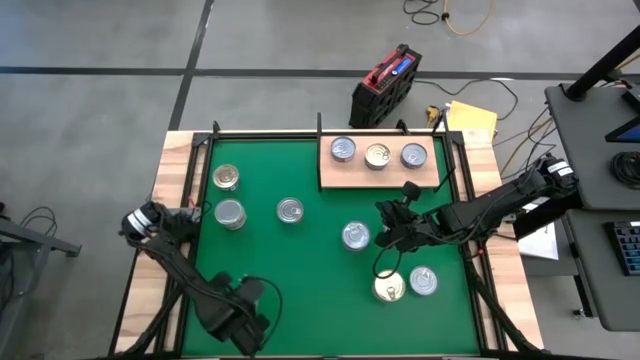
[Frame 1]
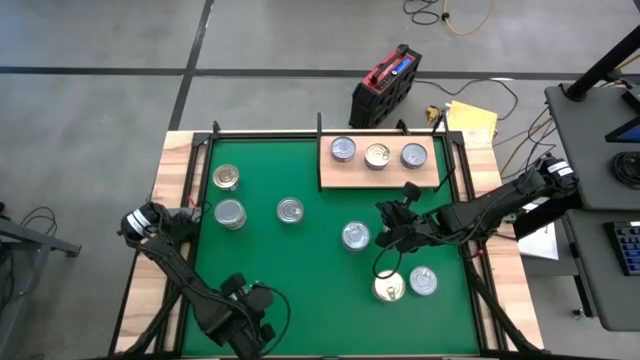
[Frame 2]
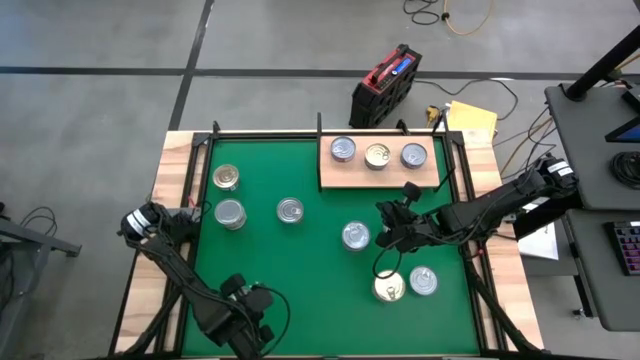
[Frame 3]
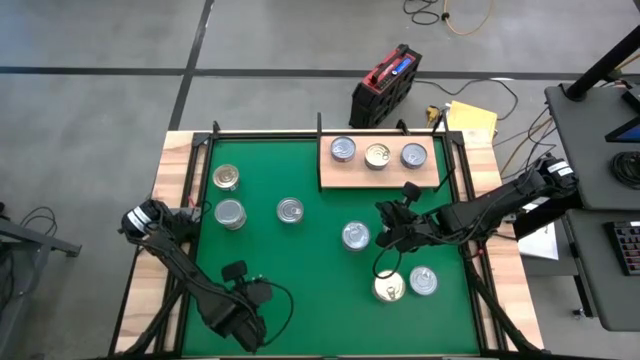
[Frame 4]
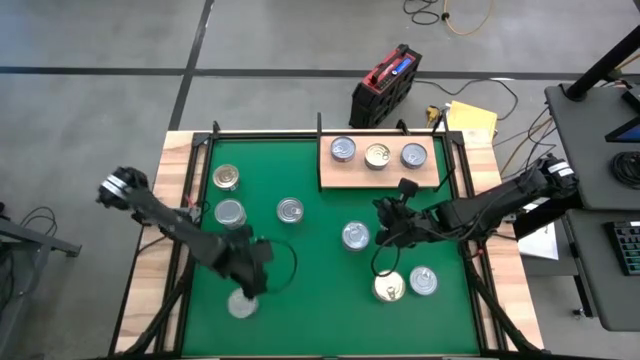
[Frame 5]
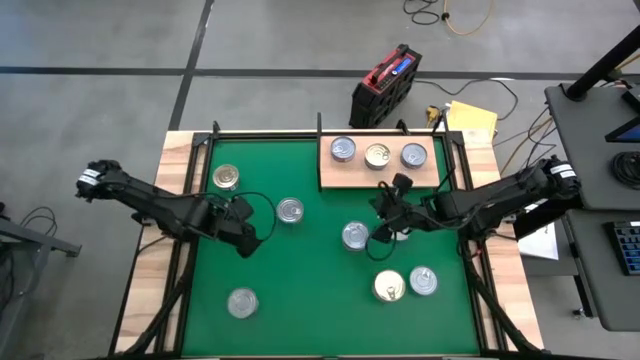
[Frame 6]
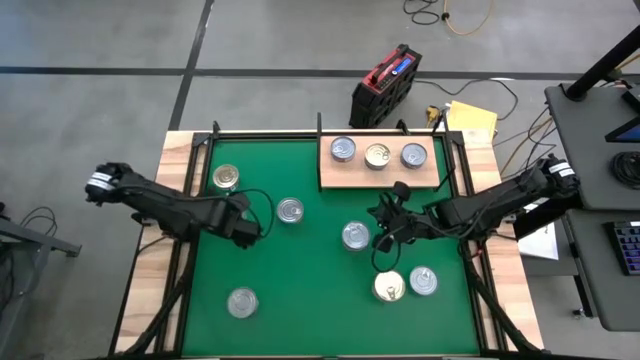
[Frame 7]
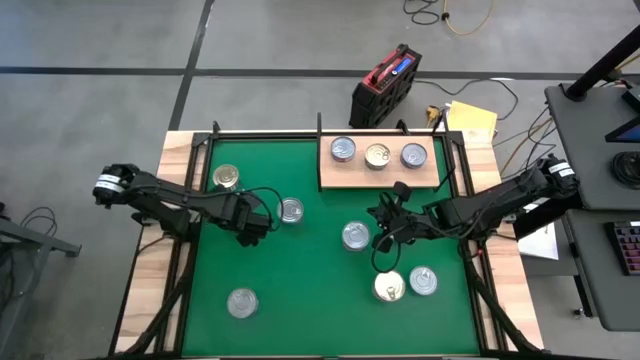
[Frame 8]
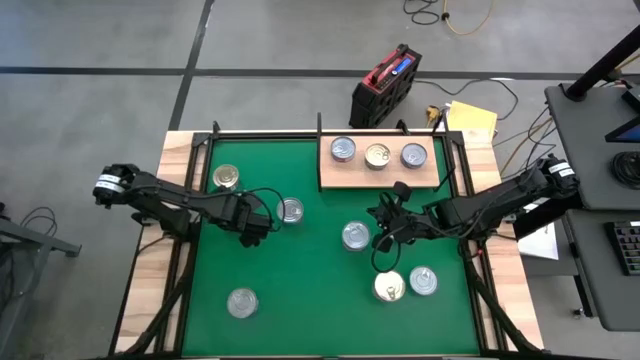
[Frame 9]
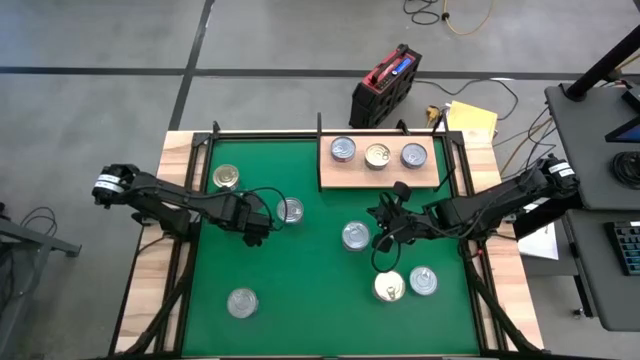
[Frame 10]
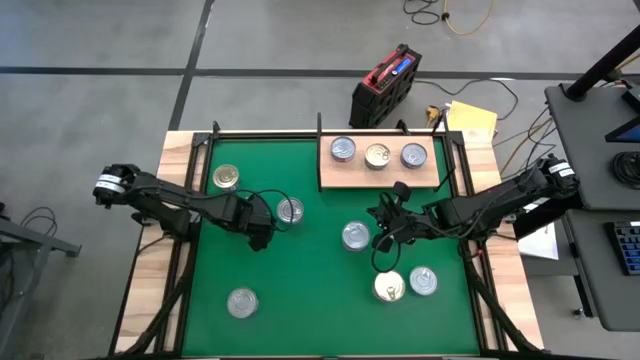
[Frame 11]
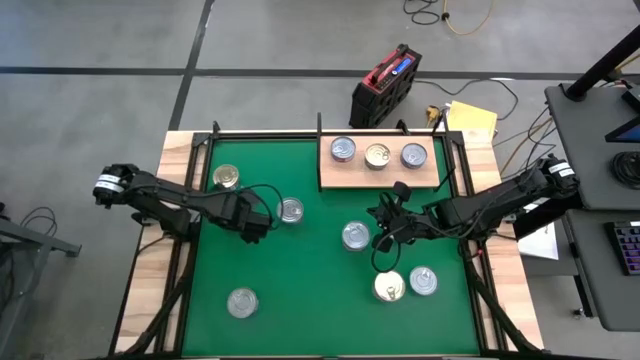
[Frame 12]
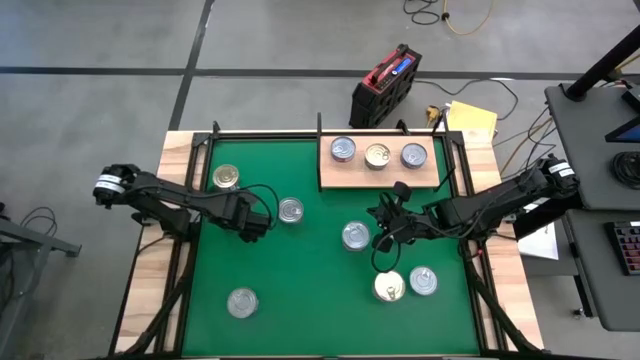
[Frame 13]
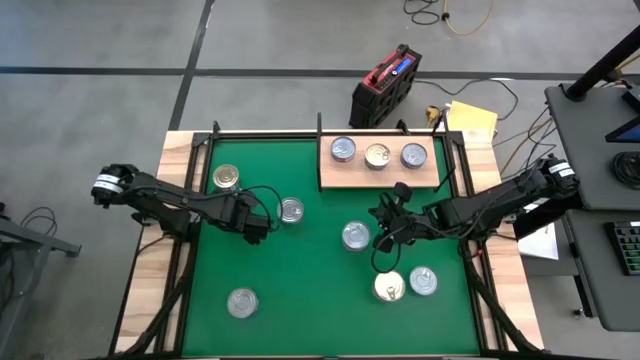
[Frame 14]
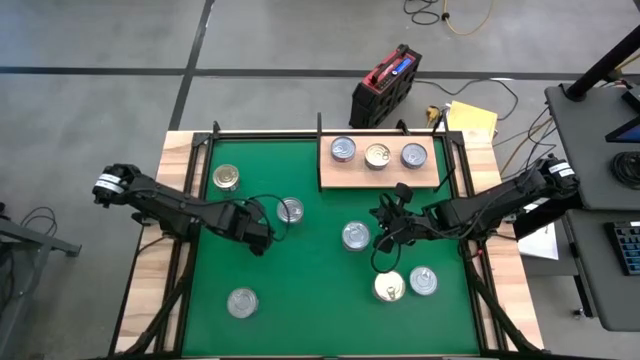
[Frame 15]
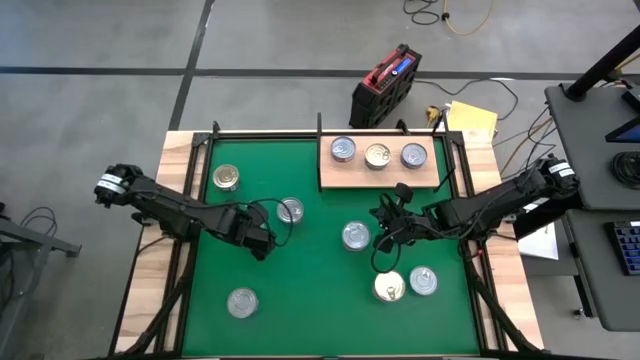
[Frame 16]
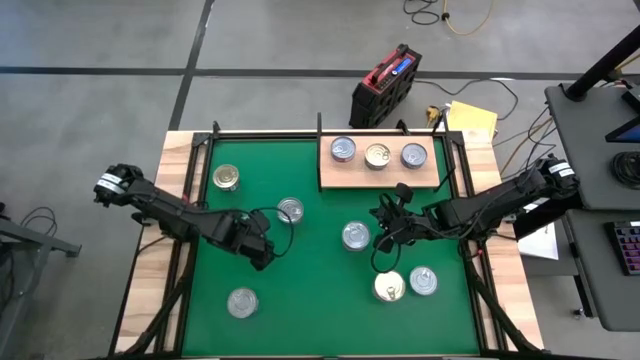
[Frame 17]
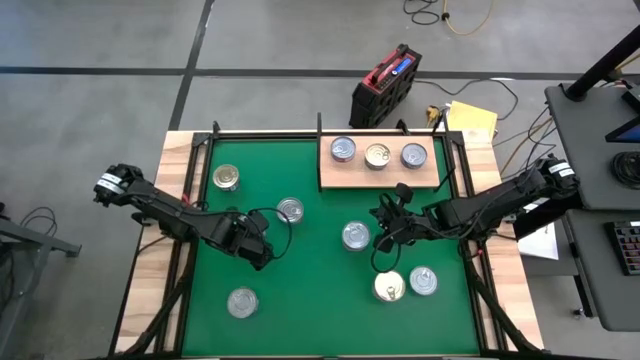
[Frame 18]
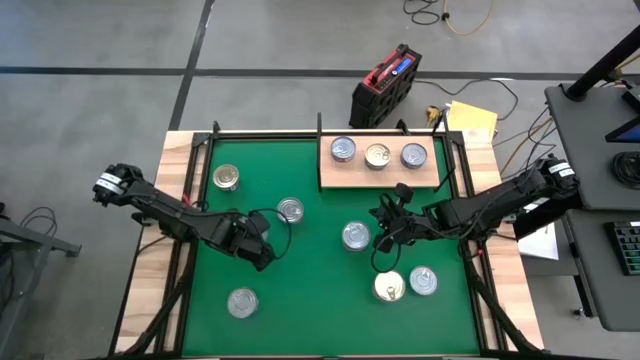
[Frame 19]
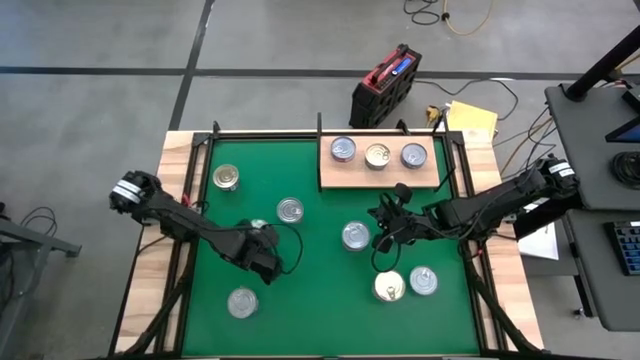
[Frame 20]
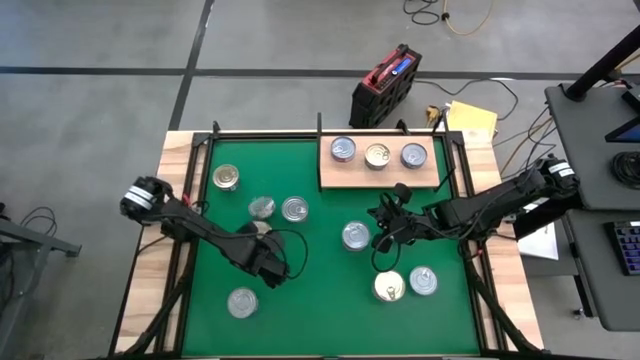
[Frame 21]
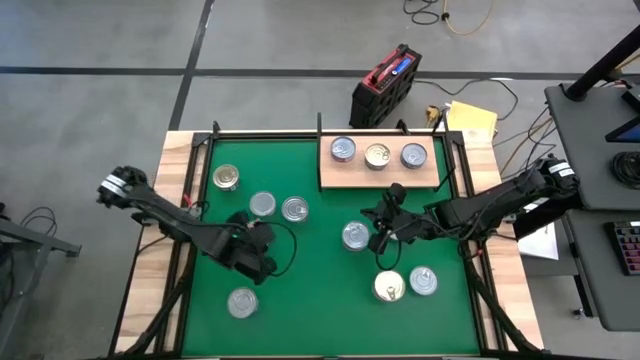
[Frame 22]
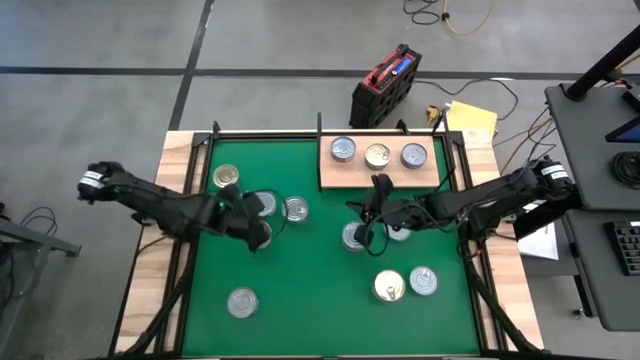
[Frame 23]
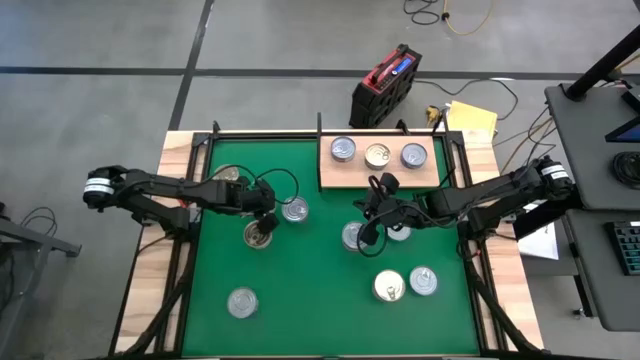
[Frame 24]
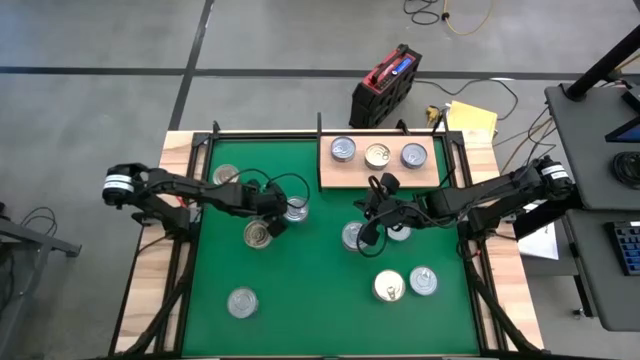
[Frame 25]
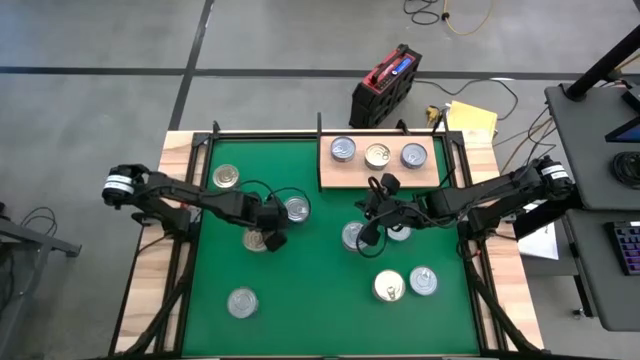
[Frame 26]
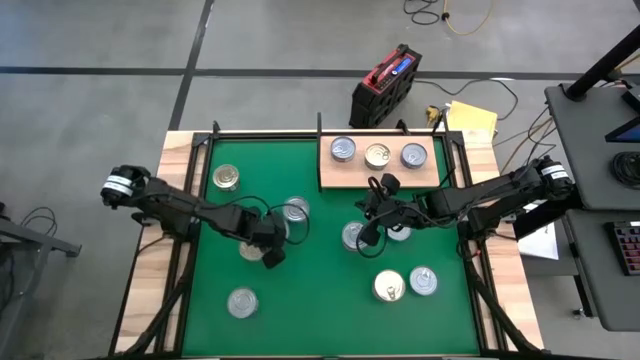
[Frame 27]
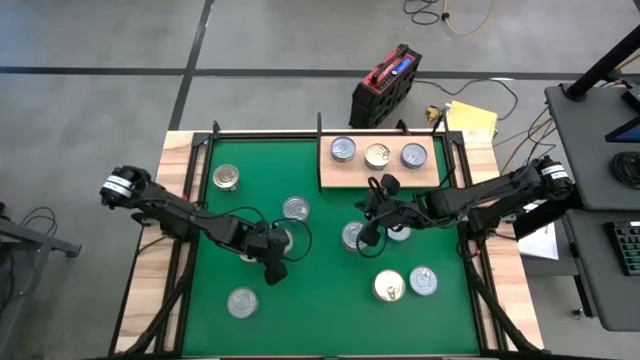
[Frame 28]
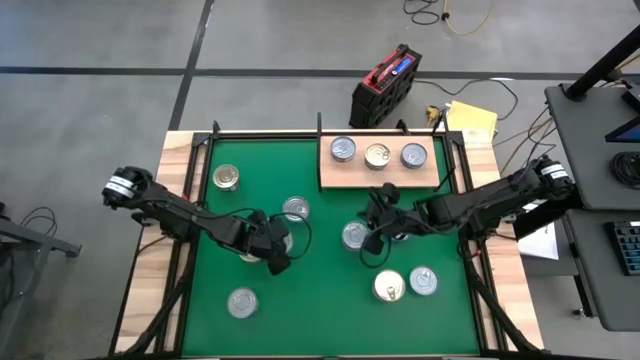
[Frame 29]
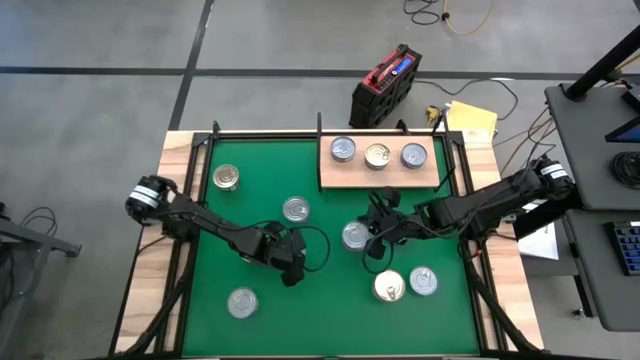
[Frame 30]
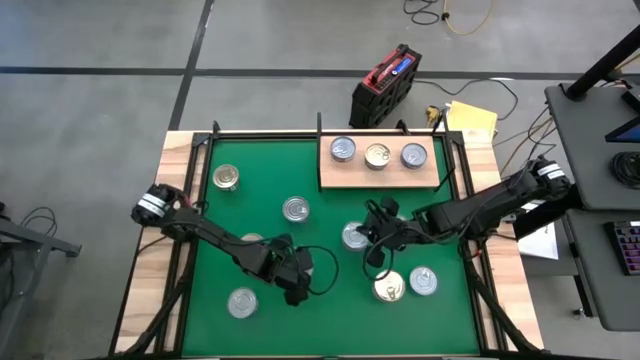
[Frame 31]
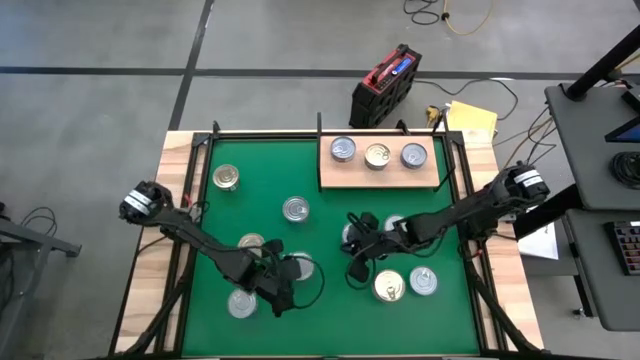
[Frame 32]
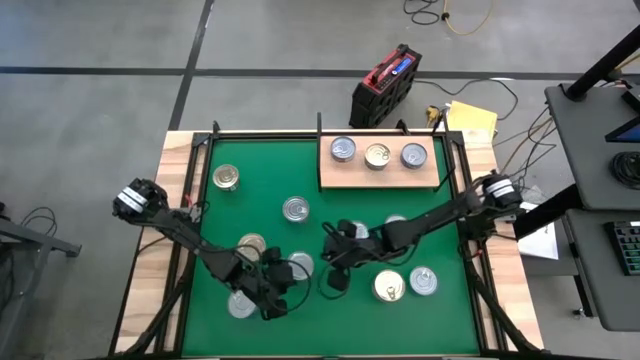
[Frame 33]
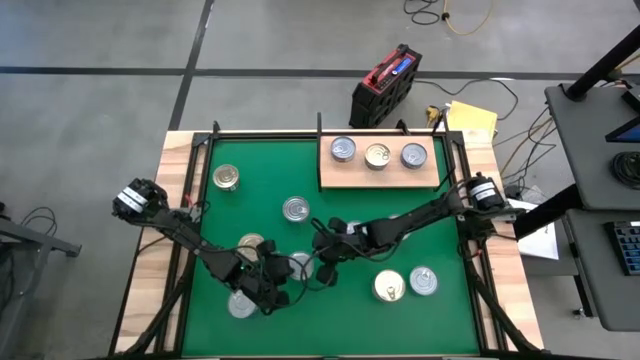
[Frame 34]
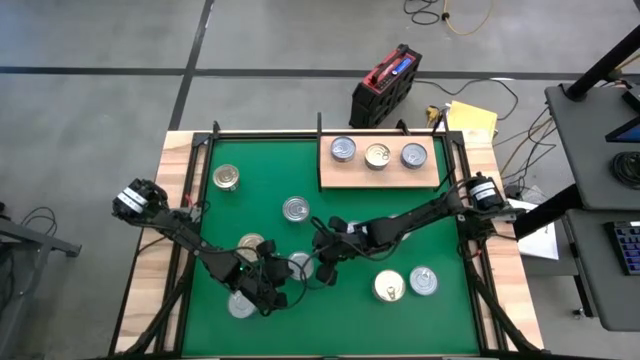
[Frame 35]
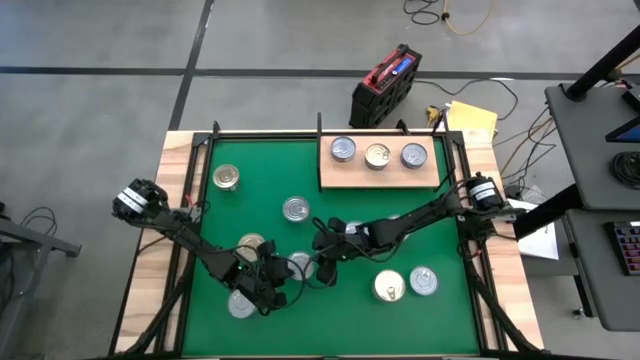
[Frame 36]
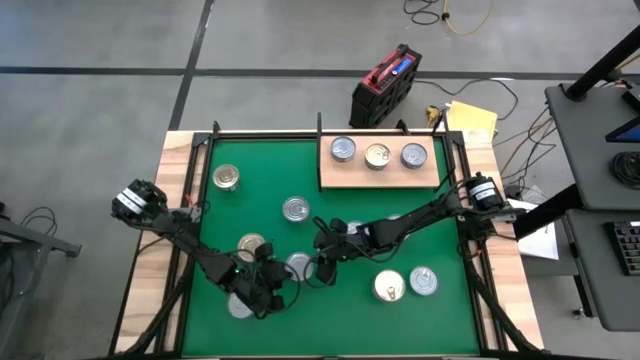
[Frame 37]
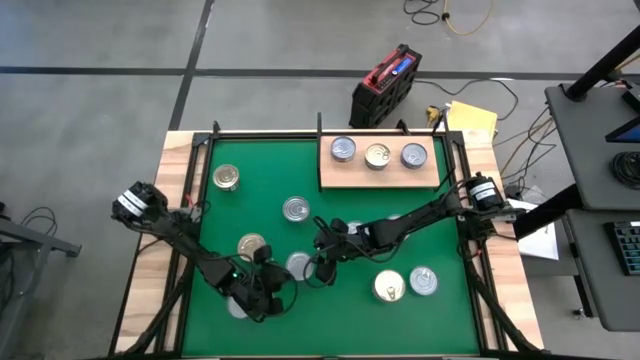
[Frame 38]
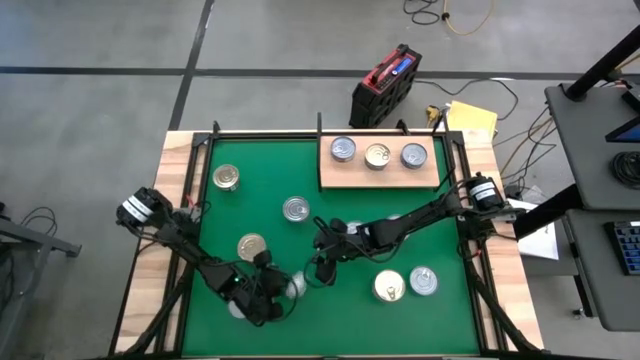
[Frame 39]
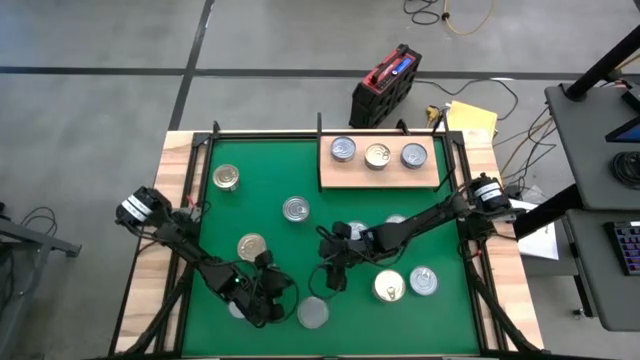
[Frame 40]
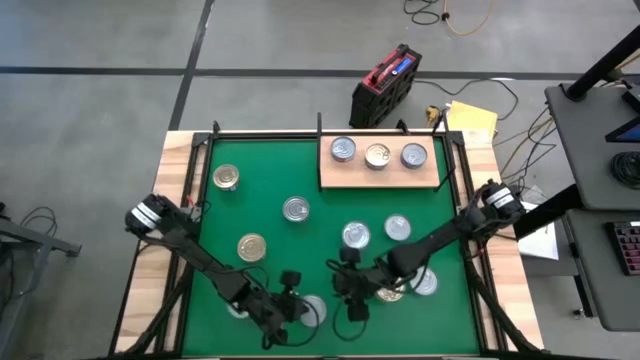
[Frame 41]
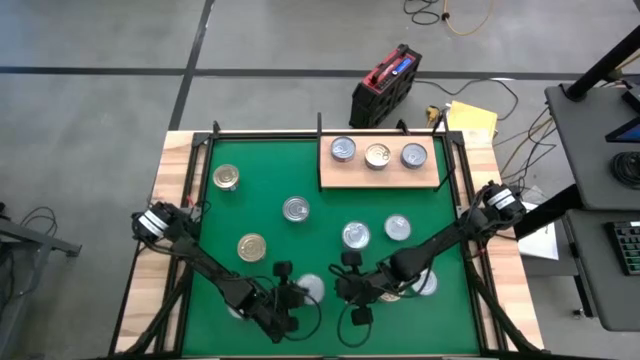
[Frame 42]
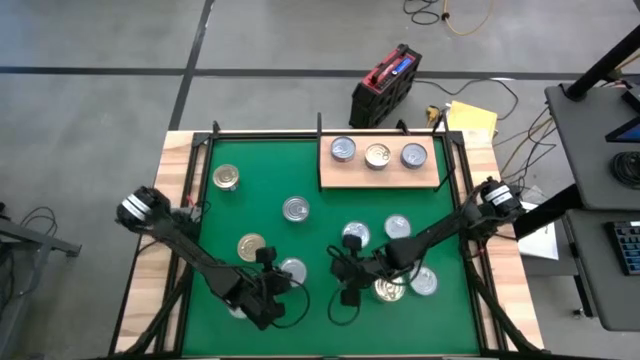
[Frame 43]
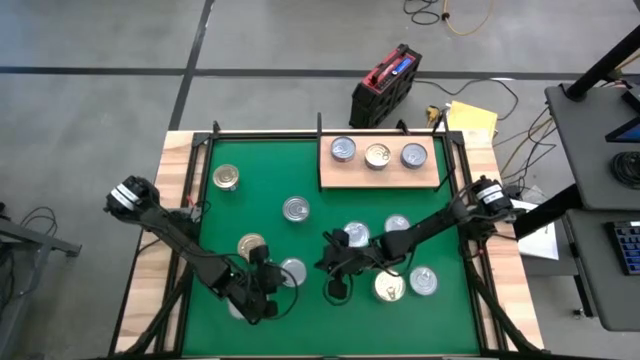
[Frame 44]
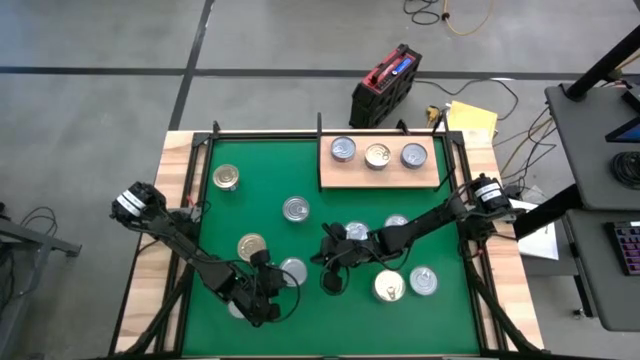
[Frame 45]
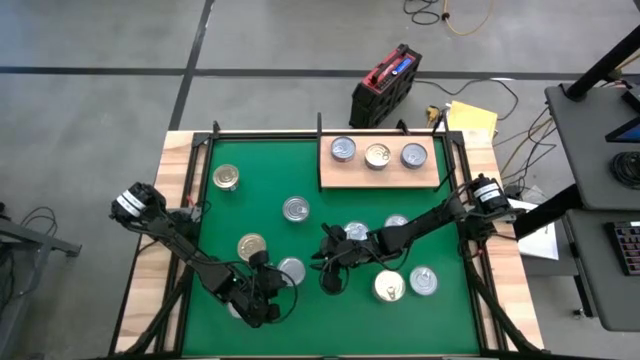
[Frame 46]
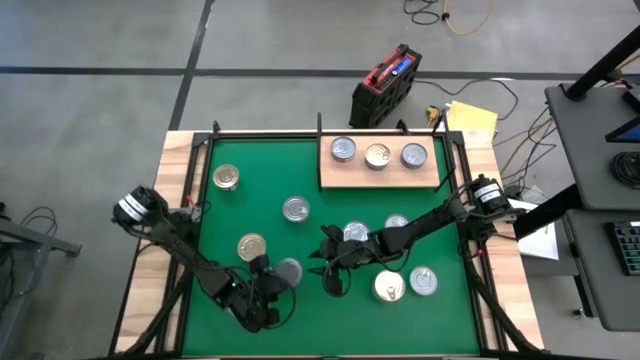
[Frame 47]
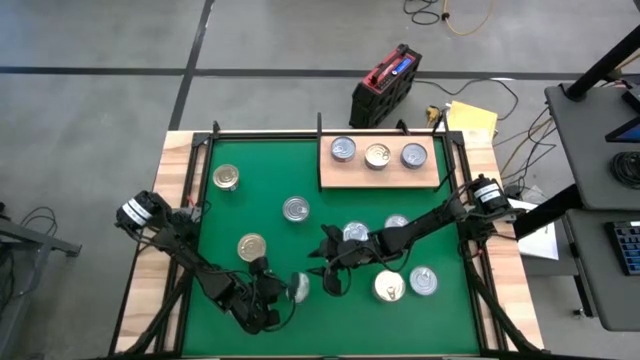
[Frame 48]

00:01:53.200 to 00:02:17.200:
Task: Stack canned seafood by type on shelf
Put the green tuna can on the shelf
